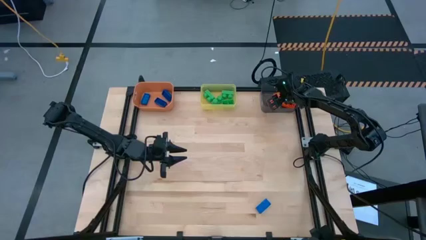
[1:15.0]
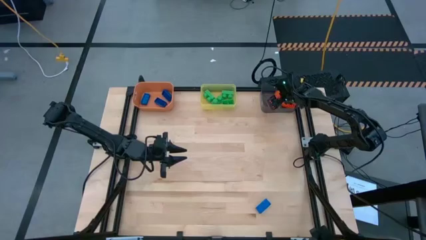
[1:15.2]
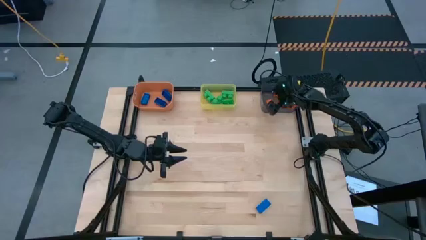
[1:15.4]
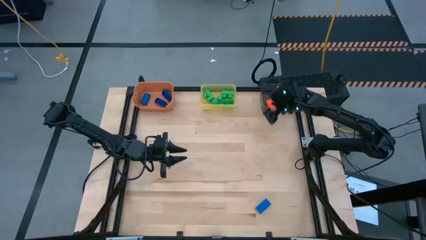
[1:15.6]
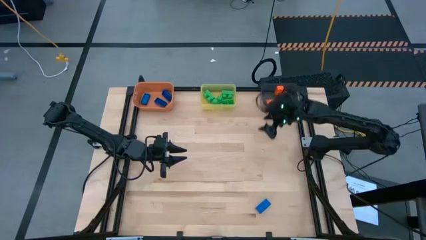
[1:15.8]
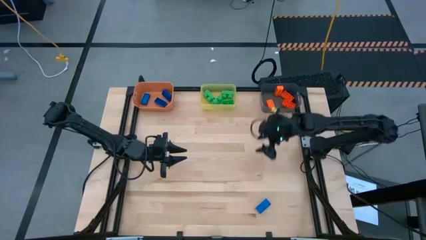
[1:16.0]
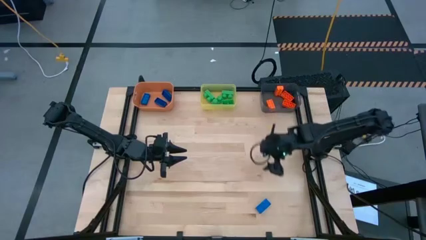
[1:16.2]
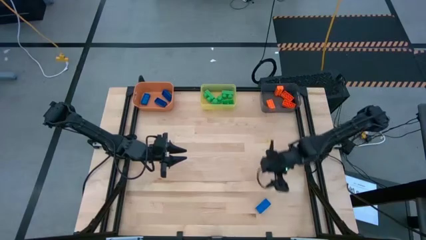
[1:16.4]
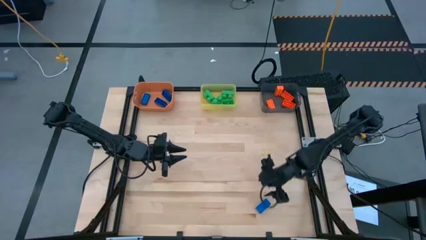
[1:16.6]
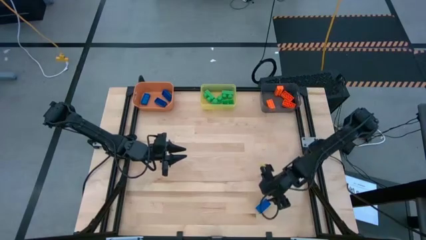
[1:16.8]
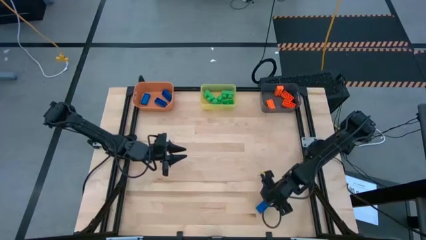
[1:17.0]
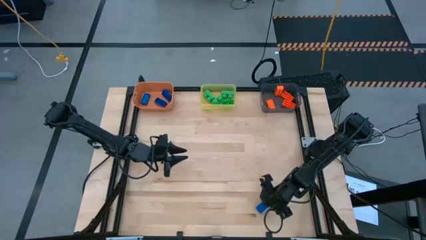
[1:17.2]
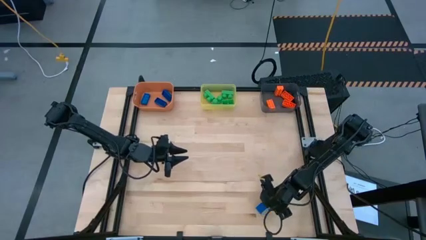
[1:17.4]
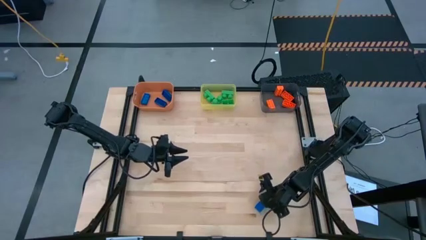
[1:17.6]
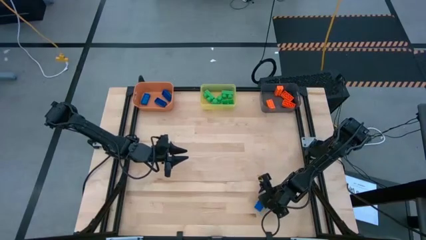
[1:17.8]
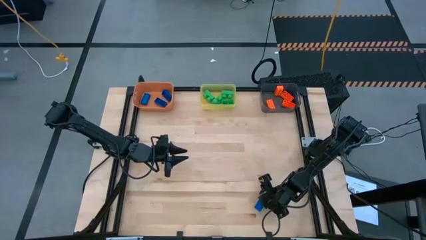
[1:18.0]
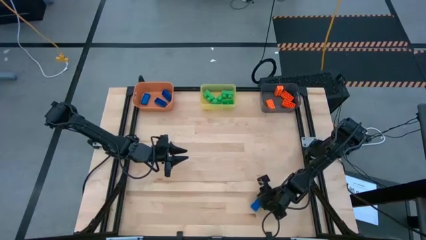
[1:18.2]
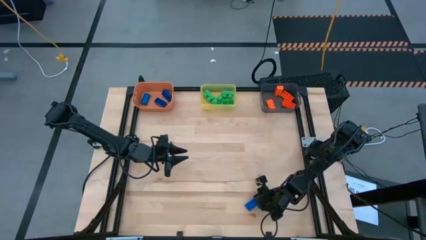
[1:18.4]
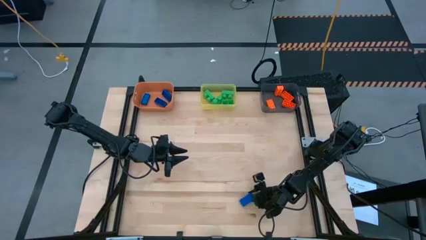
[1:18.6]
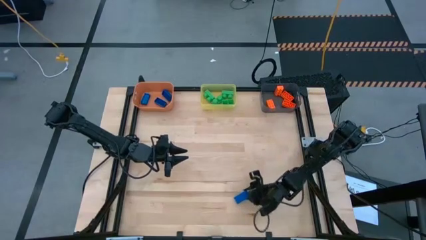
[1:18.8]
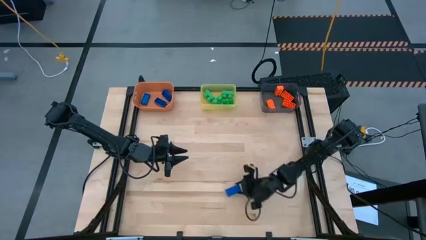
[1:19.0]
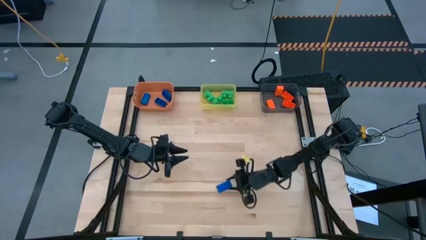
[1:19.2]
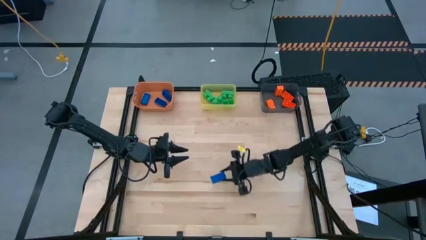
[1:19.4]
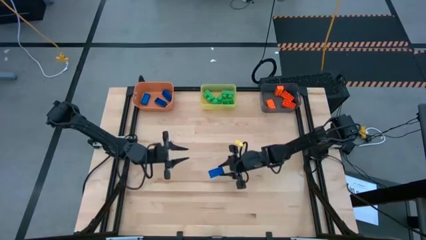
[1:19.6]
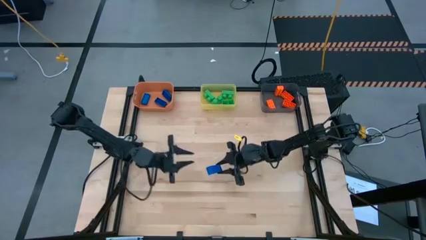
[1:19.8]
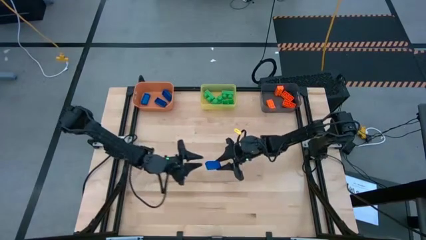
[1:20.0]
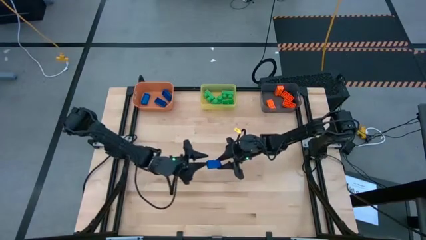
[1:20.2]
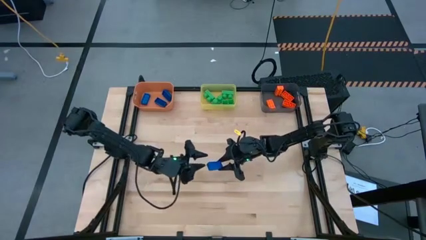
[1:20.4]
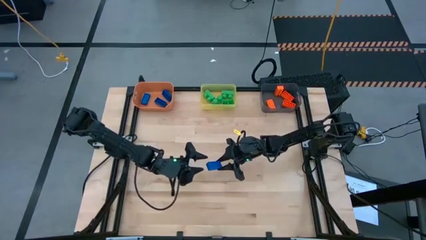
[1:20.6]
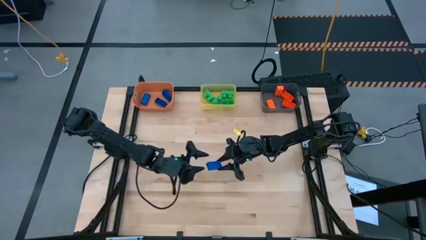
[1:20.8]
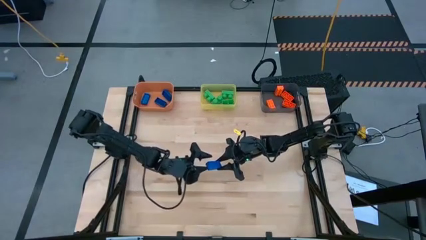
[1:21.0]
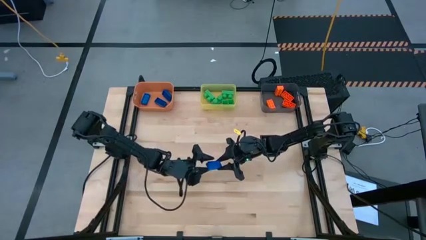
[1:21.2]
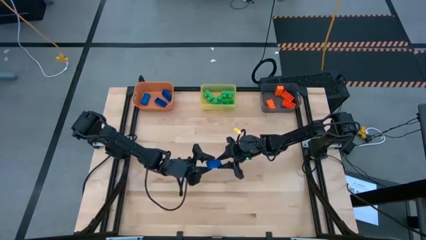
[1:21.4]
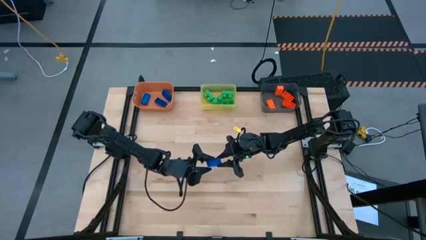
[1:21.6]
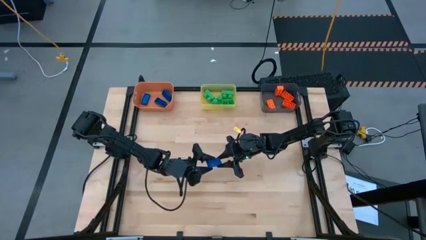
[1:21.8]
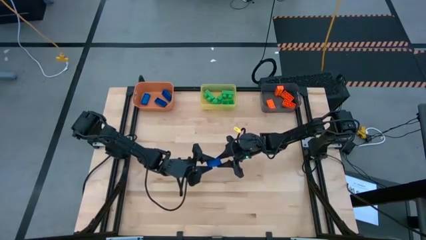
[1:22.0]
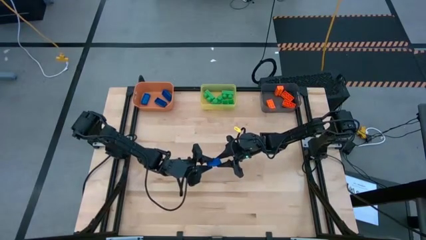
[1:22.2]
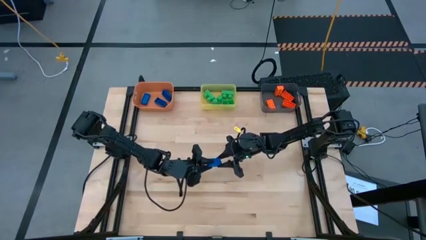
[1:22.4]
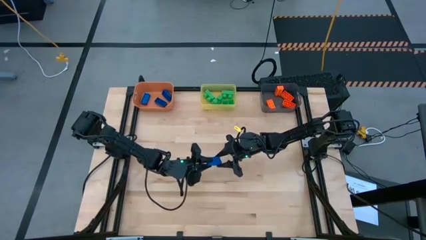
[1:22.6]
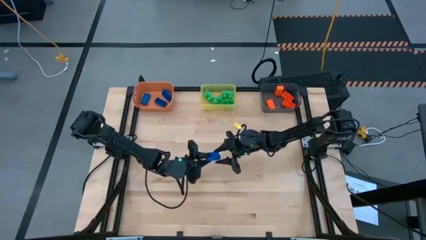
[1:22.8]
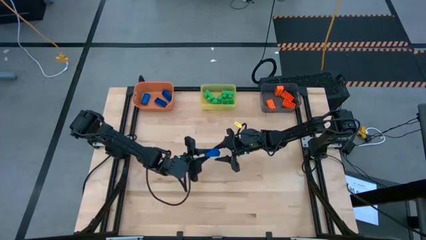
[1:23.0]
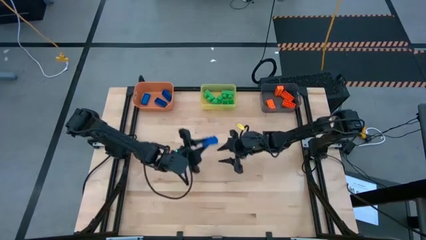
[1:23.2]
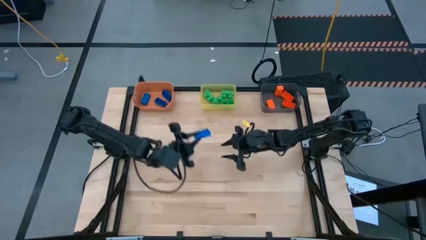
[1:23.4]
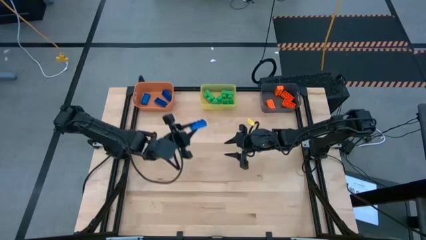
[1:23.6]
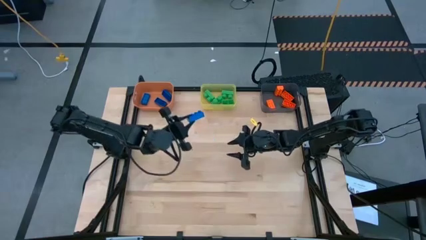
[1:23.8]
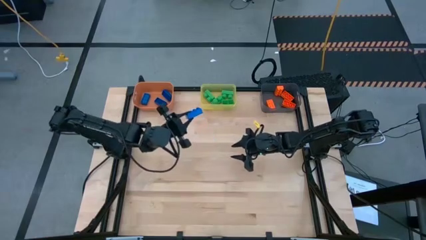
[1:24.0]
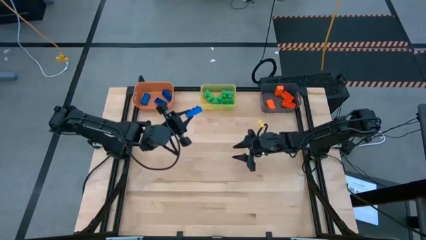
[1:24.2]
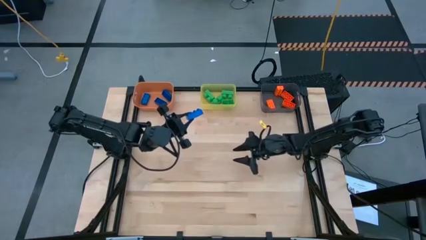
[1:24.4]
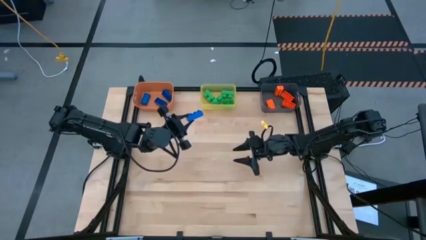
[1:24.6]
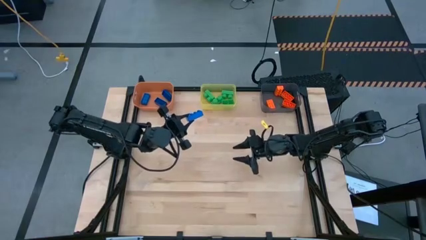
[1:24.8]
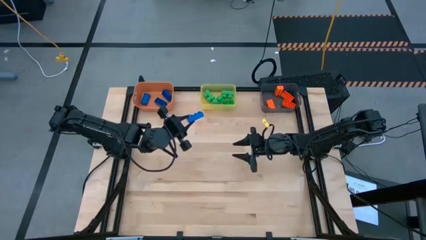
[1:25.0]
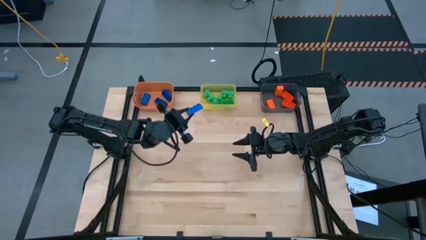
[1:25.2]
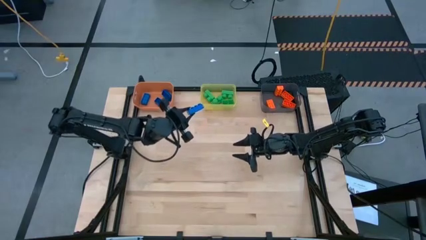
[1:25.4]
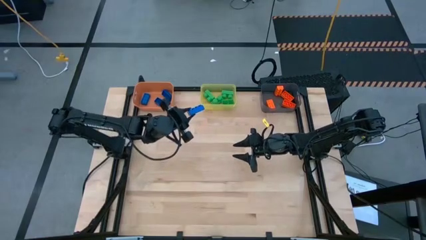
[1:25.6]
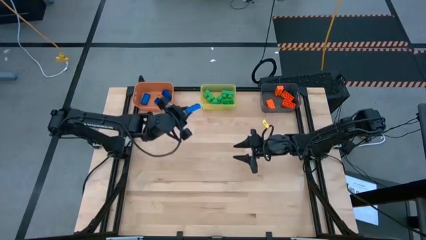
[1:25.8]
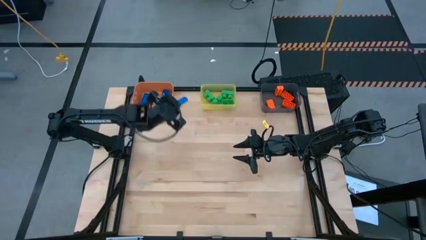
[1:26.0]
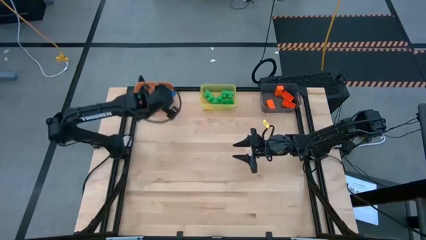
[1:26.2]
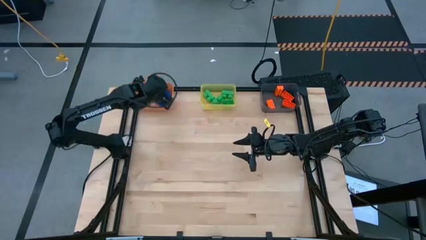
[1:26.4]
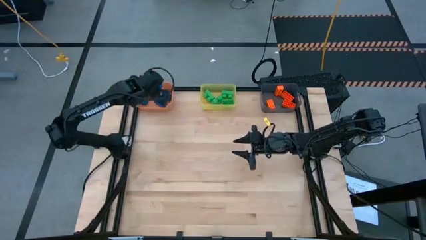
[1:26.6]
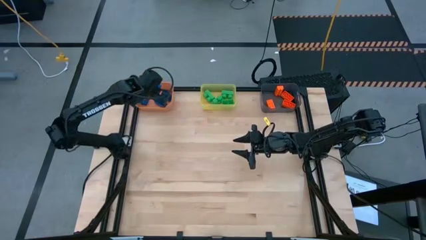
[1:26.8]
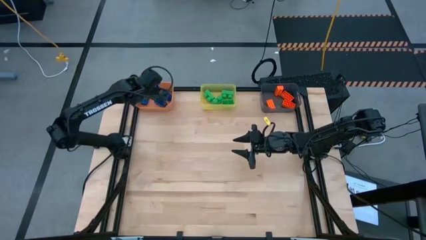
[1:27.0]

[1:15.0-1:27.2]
Task: Sort & place blocks by color
Put the blue game piece into the orange bin

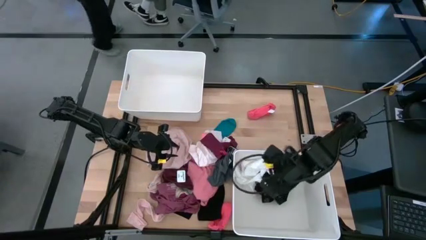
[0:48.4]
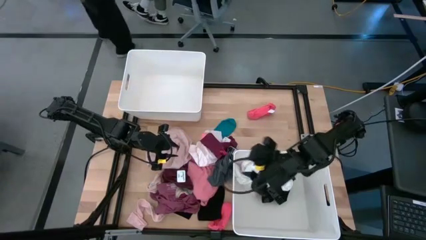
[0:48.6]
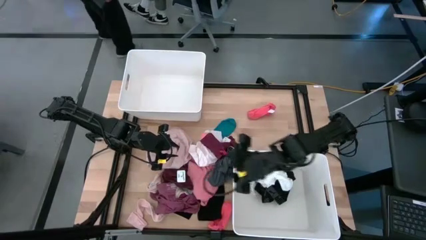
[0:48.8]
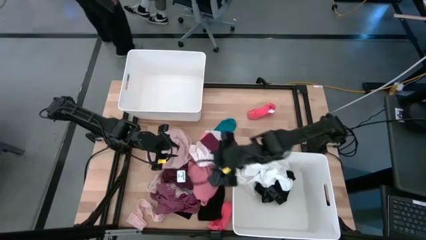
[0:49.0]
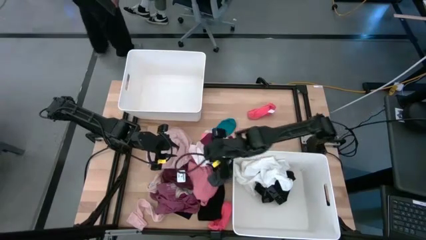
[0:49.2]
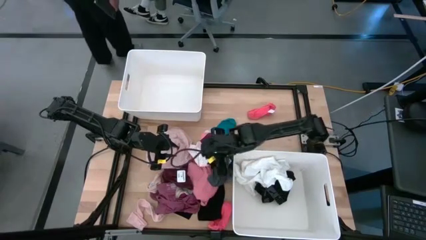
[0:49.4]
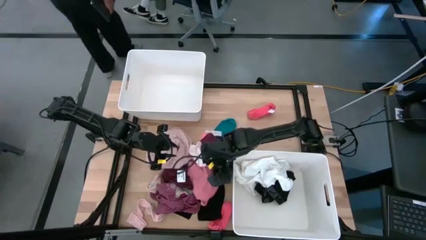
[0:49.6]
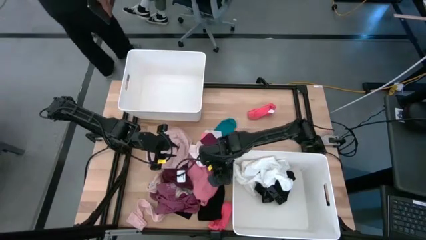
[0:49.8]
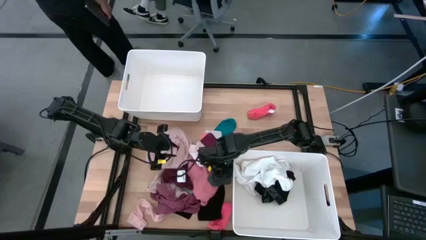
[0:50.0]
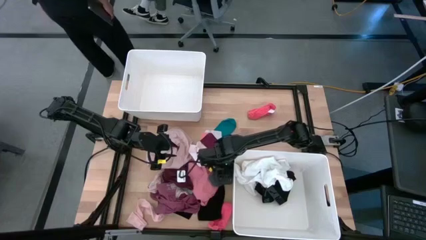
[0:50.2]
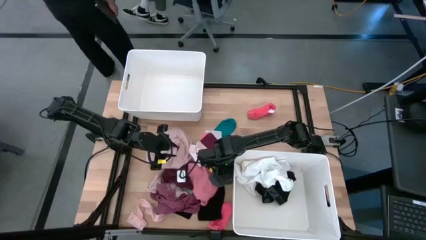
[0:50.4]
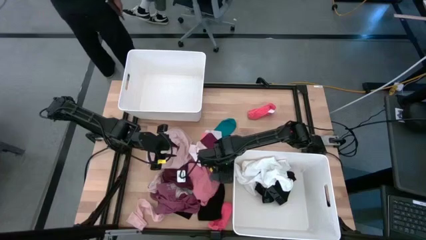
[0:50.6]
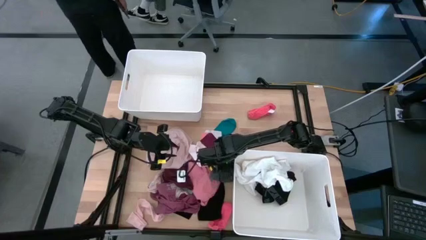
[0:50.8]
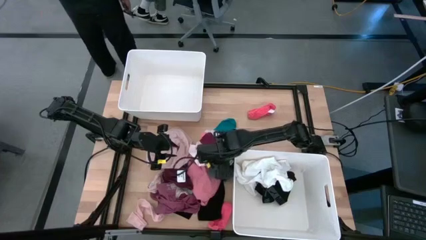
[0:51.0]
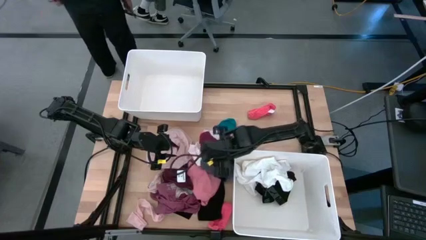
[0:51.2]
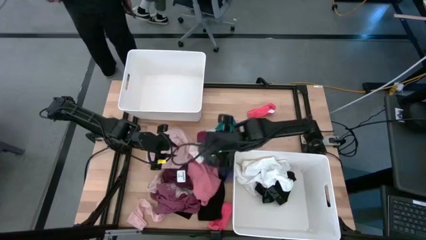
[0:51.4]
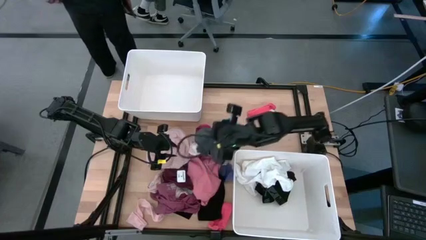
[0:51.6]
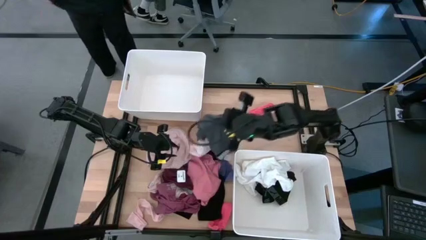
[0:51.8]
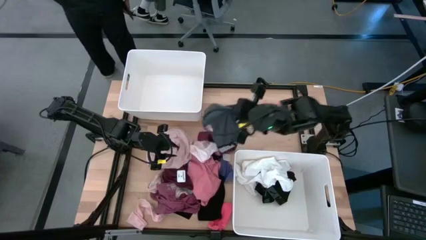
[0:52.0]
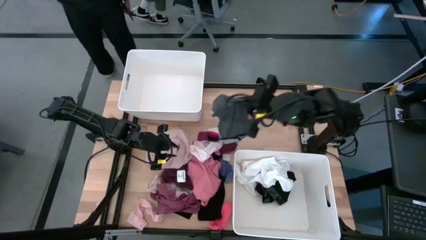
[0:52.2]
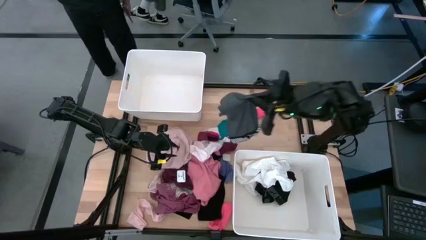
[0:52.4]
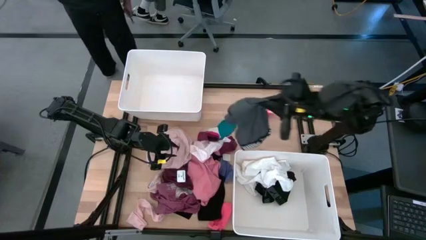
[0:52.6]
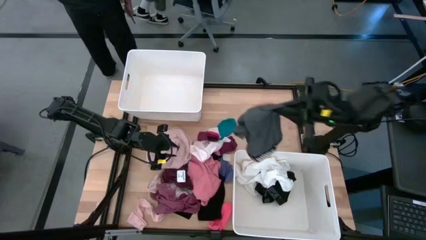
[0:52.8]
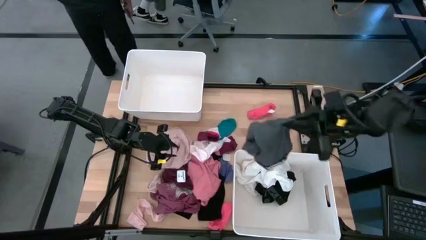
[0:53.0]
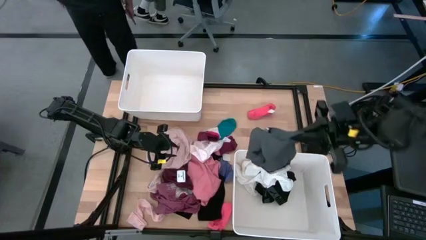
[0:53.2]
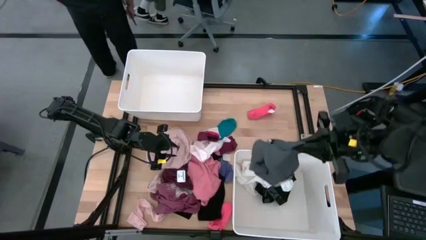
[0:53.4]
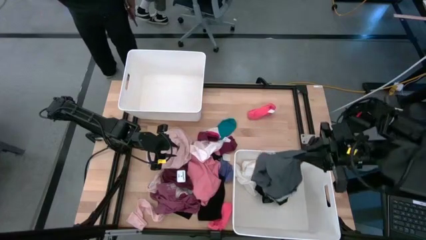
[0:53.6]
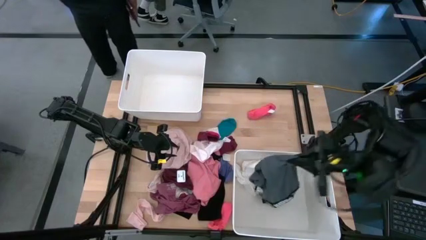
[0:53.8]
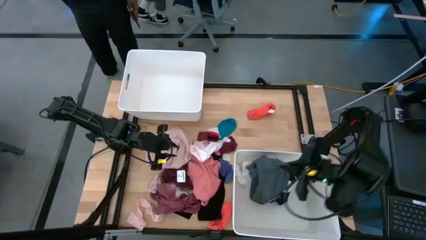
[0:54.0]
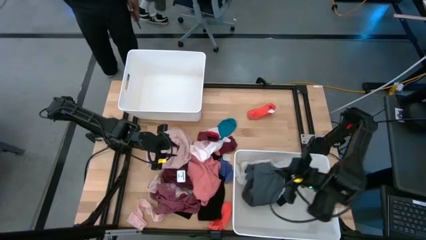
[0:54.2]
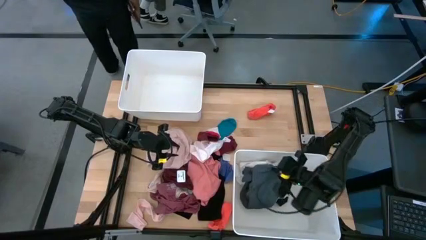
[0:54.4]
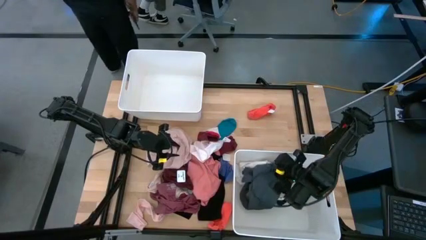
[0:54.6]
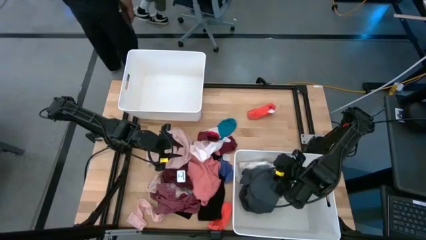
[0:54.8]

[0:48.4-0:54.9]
Task: Sort clothes
Put the gray underwear into the bottom white bin
